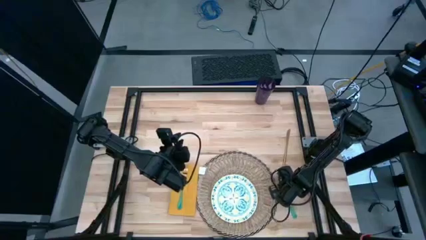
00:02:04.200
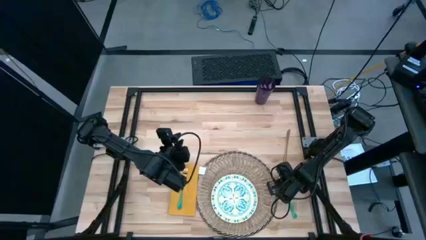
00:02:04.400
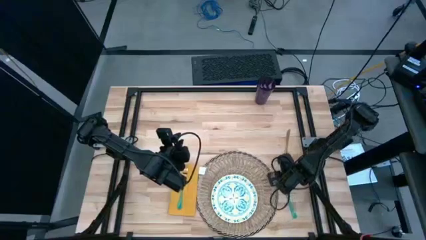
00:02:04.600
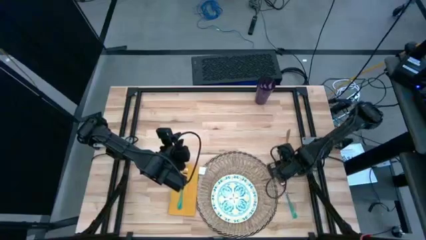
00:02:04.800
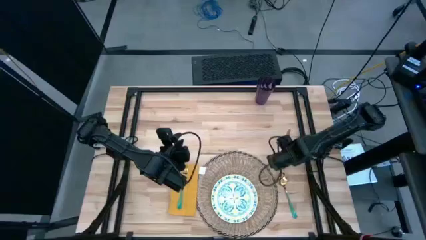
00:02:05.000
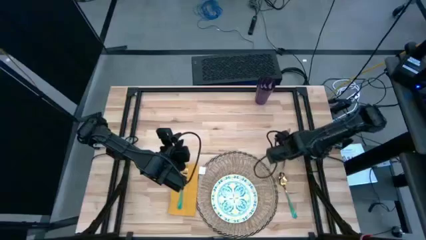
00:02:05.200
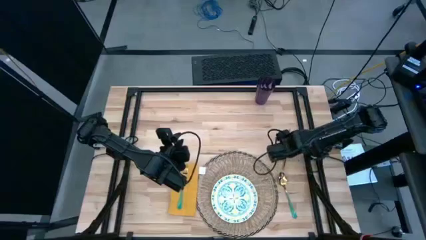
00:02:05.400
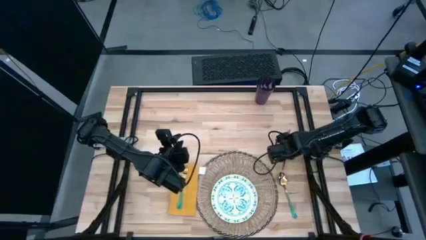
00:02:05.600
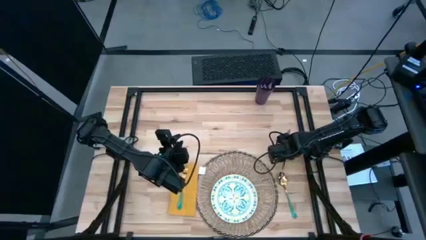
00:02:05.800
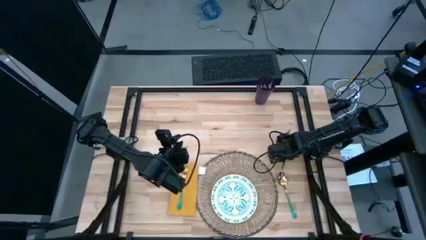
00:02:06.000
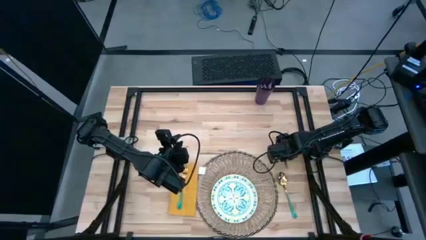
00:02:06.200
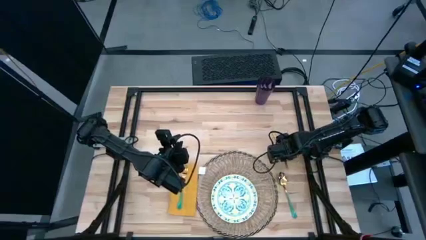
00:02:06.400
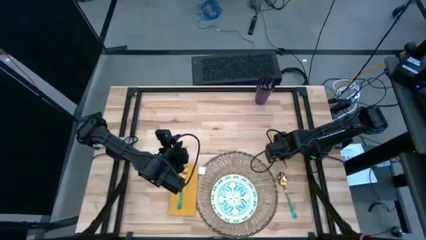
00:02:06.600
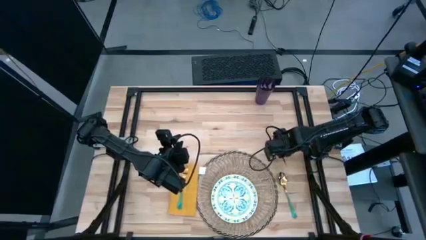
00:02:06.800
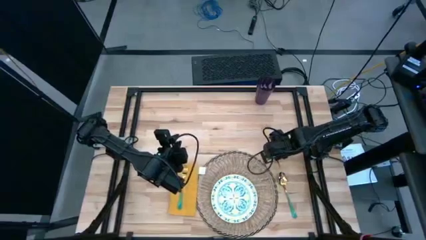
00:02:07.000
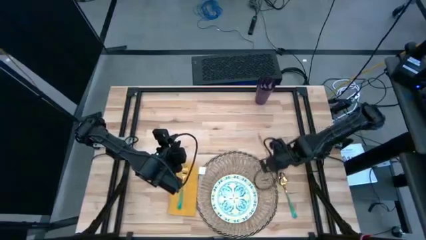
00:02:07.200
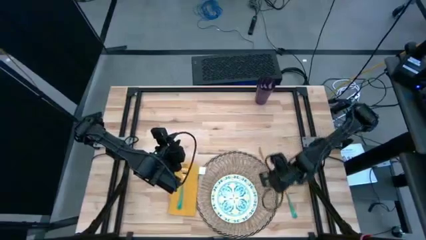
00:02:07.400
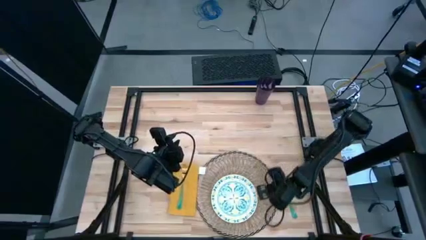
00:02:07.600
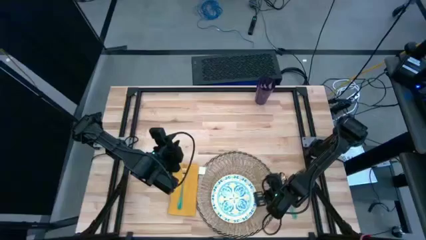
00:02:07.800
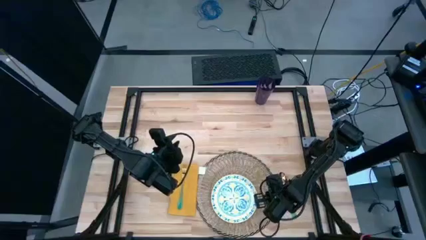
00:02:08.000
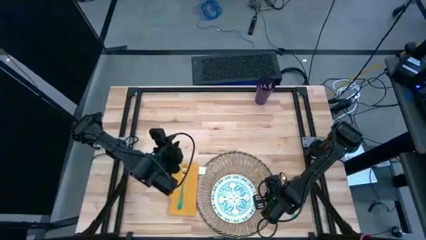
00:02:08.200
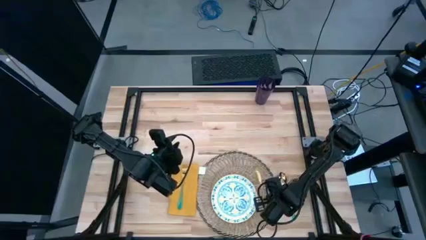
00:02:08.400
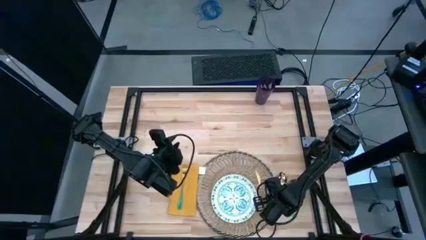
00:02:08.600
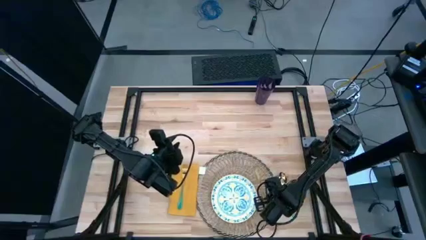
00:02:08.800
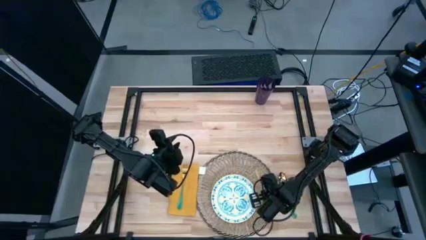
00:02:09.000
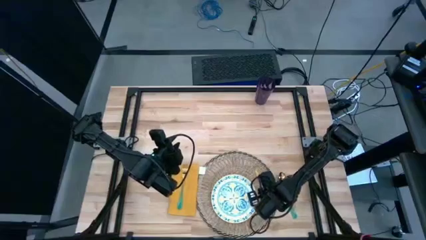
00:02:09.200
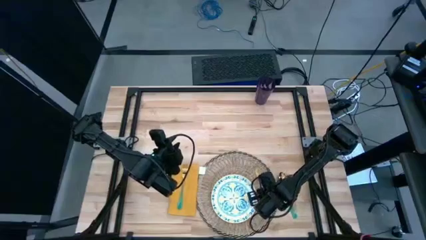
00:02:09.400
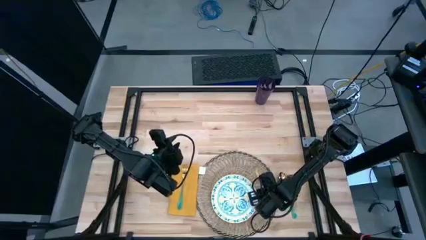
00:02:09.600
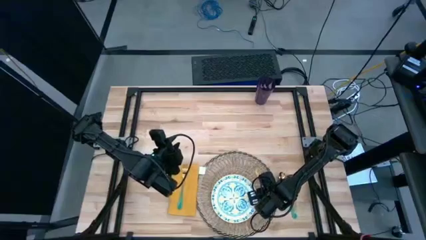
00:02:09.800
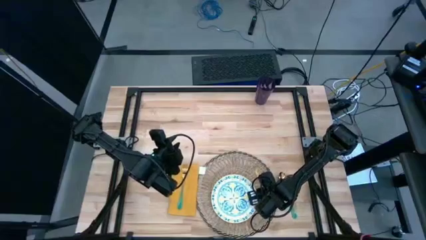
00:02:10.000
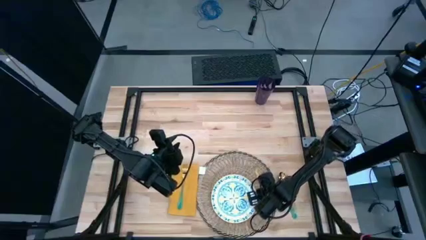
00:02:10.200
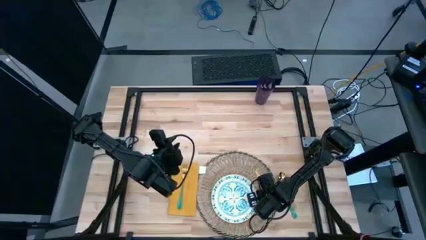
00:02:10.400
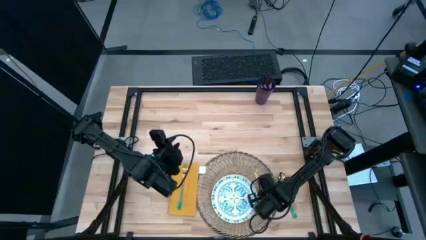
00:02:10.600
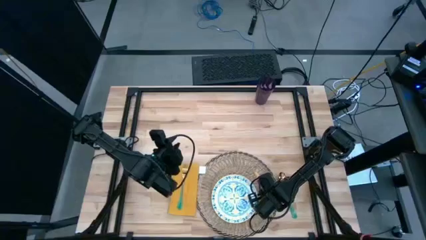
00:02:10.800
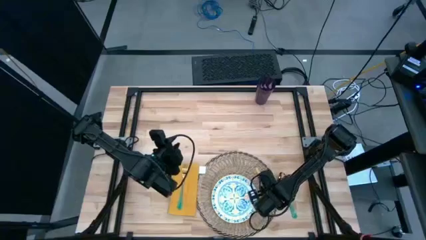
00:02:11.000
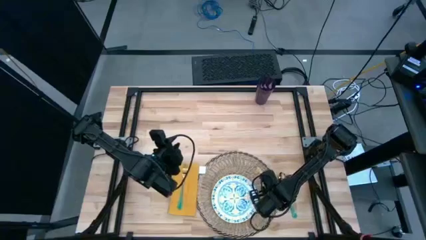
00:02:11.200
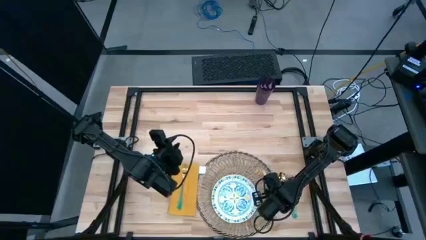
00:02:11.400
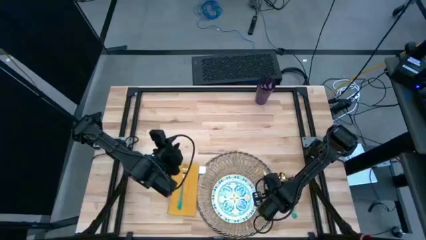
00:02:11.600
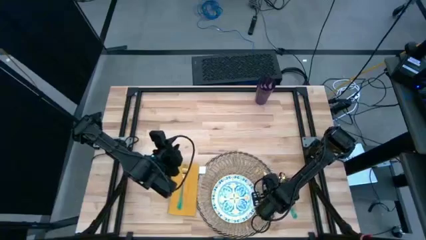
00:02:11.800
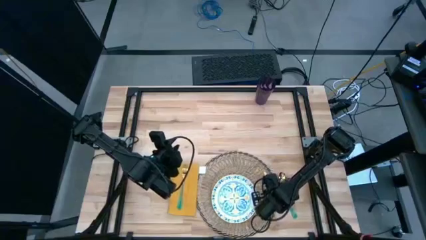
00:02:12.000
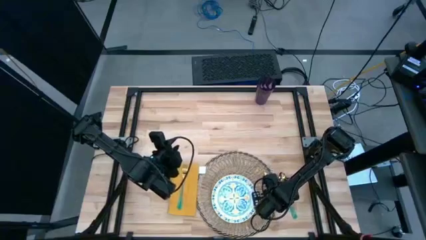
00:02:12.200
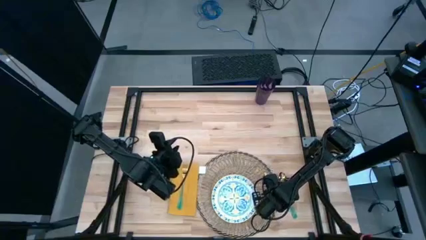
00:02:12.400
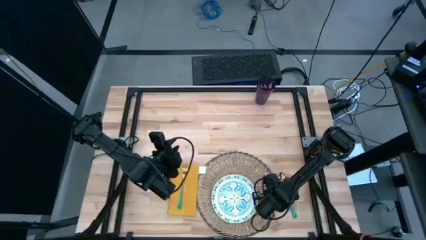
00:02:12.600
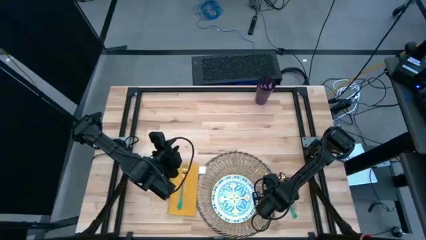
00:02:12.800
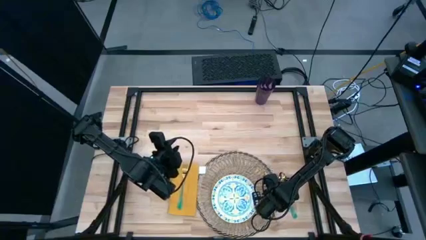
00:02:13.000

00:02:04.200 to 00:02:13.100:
Task: Set table place
Put the gold knife on the brown placemat to the right of the white patterned plate

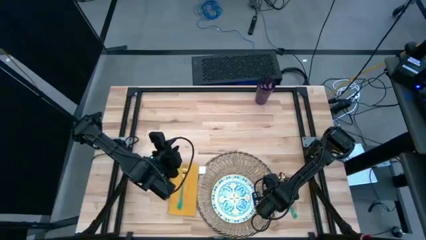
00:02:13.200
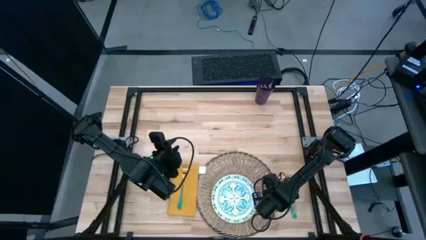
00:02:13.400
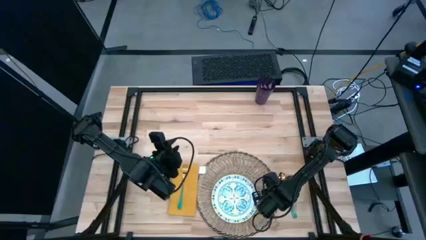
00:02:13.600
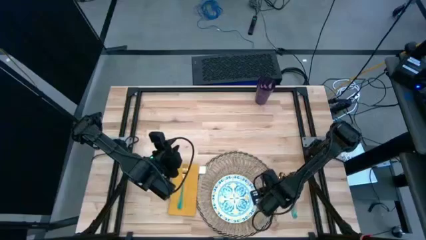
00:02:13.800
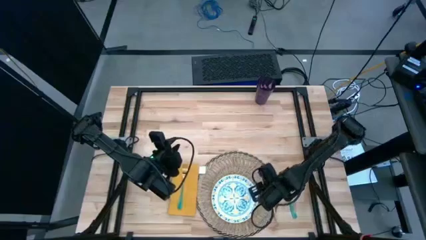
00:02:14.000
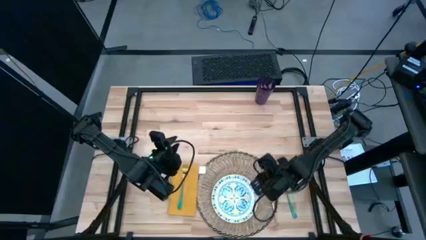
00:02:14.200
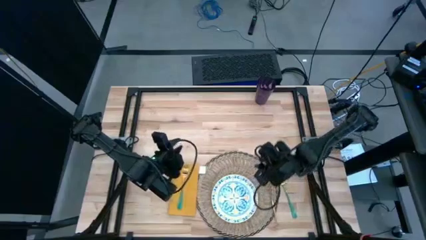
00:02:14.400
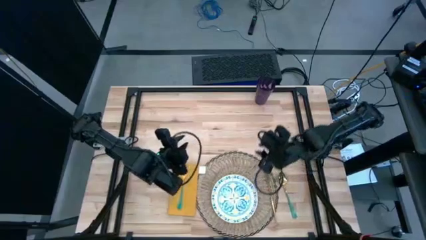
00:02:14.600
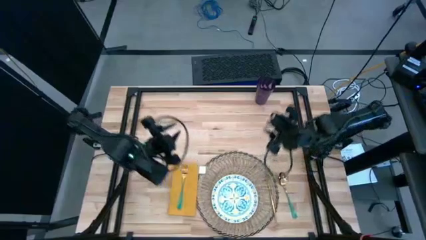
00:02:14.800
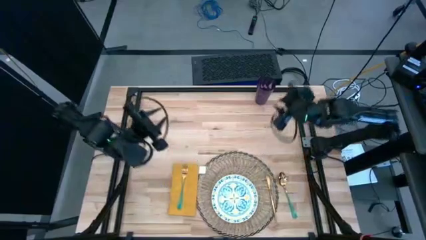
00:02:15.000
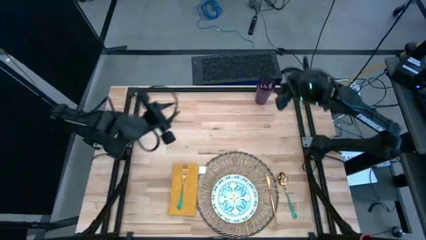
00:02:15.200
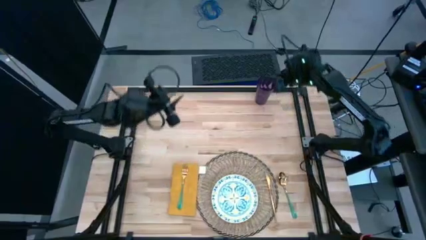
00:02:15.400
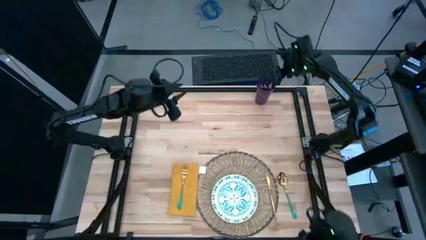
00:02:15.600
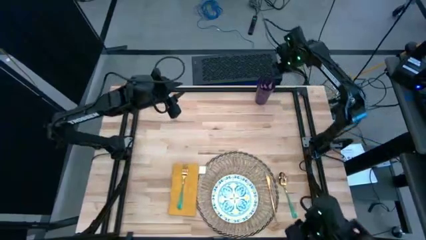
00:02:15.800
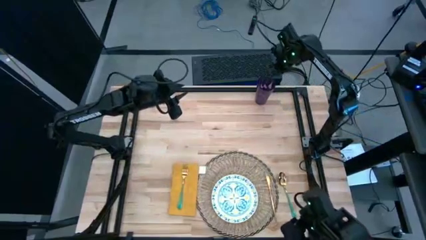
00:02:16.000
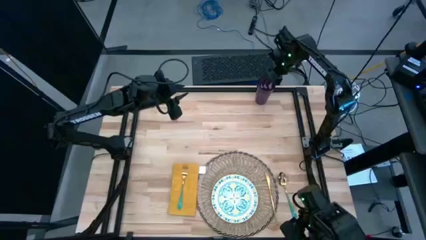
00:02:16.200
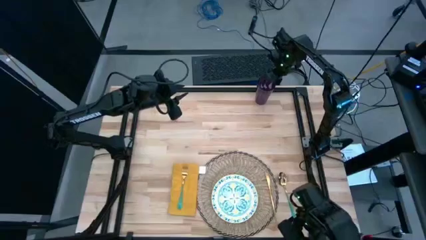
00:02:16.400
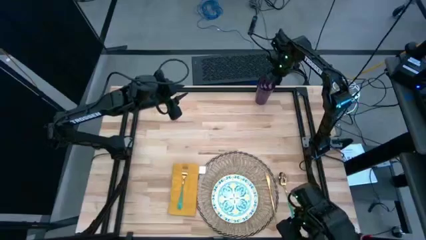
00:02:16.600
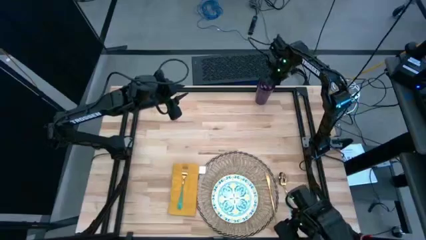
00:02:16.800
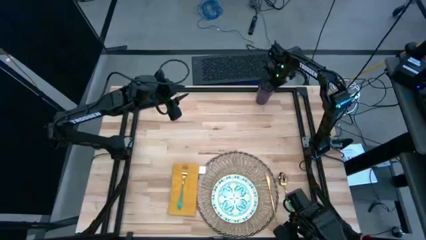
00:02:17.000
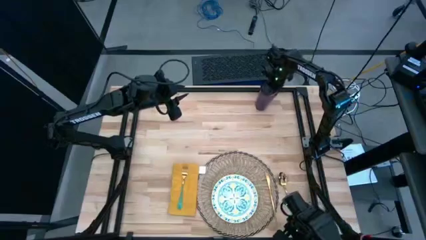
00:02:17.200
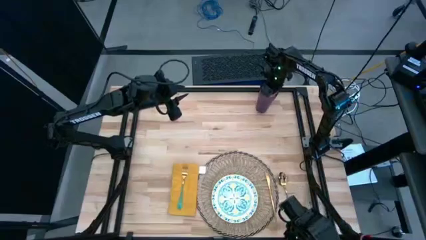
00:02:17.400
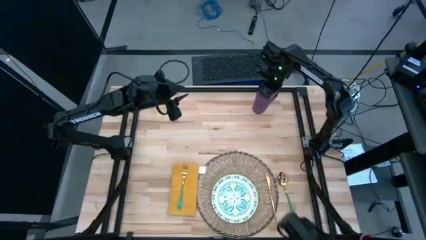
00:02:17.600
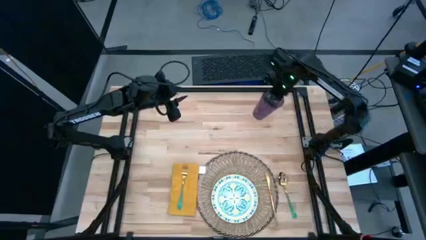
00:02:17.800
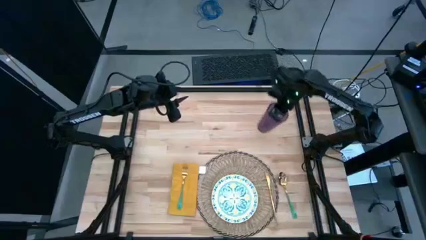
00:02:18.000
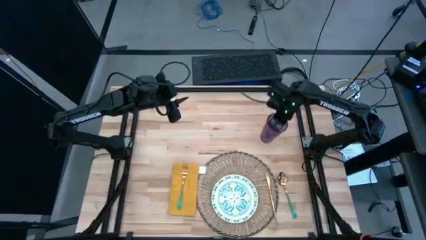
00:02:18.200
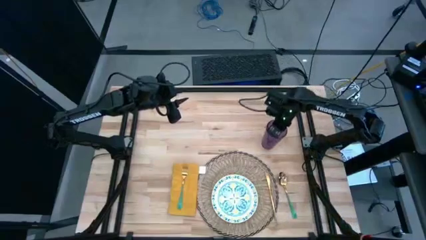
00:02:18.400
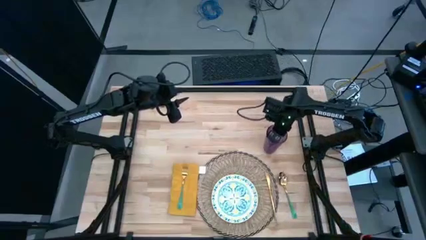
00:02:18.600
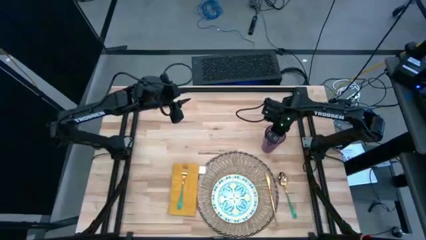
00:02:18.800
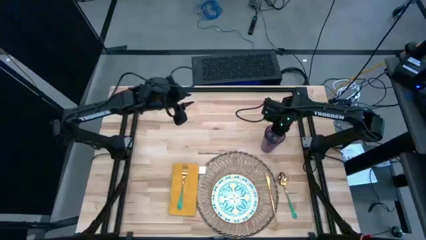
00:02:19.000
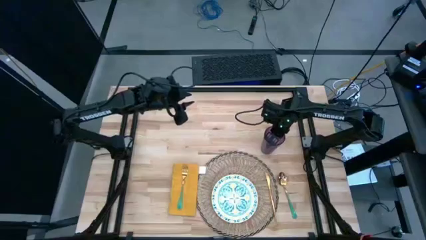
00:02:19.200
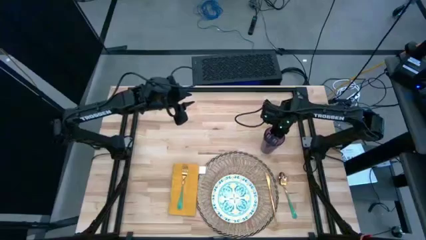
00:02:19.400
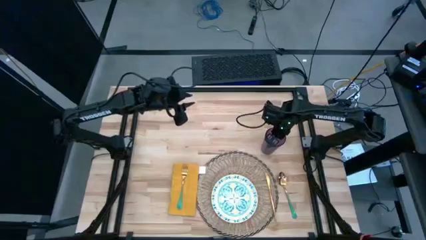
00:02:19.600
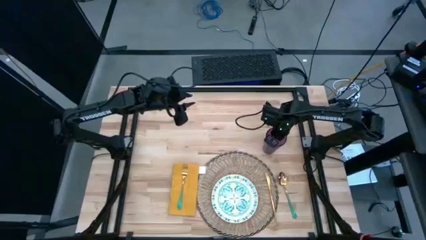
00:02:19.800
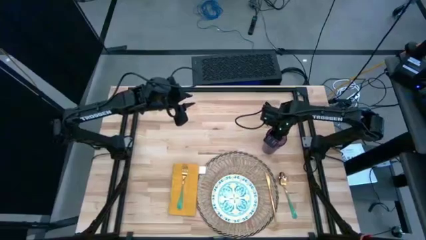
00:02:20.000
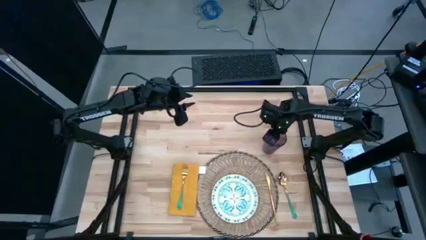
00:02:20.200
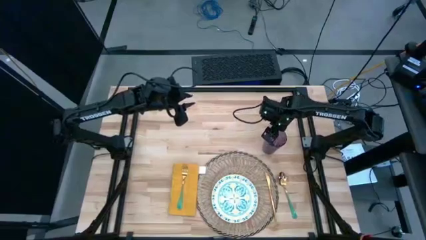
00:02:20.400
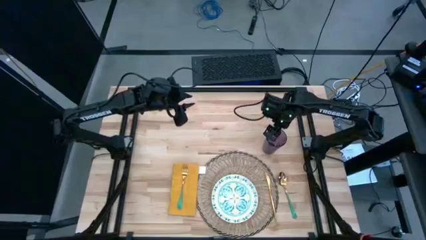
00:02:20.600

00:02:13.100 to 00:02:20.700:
Move the violet glass to the top right of the brown placemat
